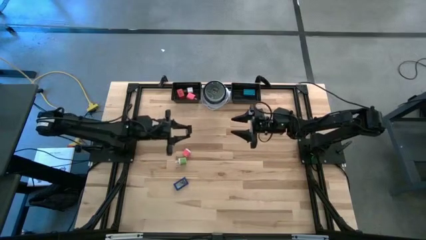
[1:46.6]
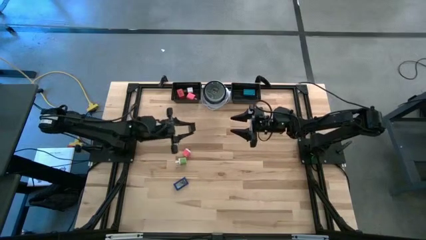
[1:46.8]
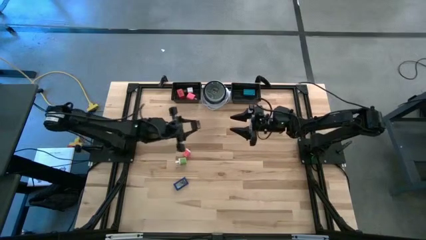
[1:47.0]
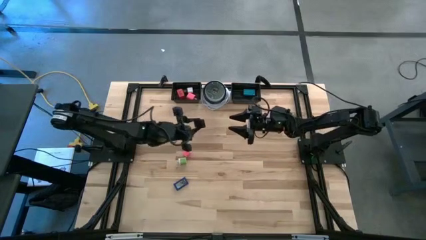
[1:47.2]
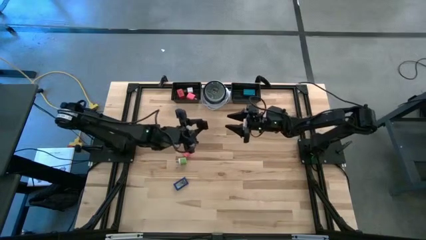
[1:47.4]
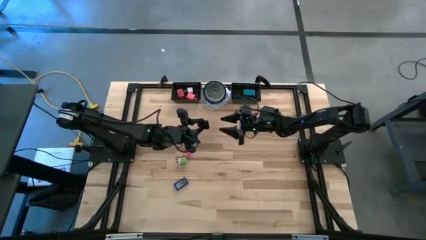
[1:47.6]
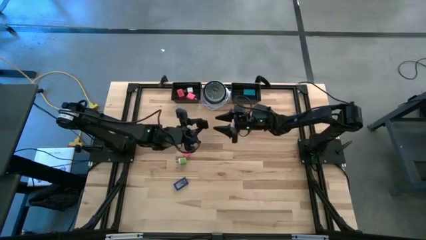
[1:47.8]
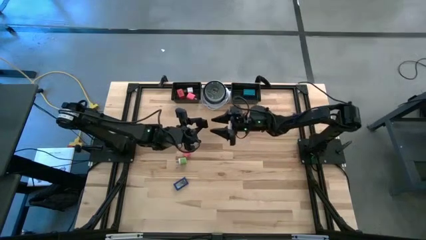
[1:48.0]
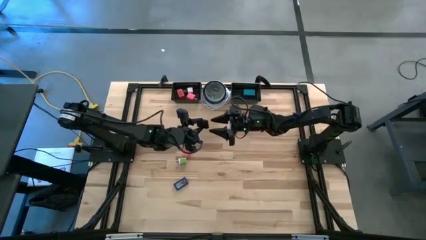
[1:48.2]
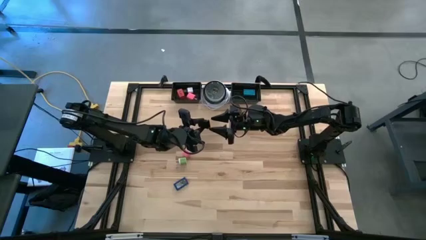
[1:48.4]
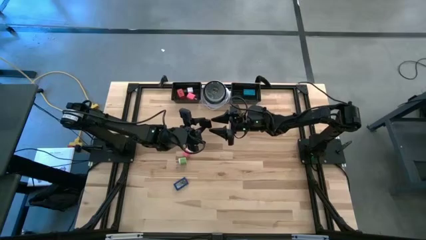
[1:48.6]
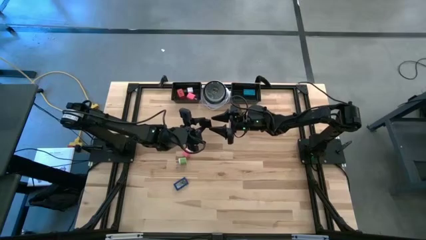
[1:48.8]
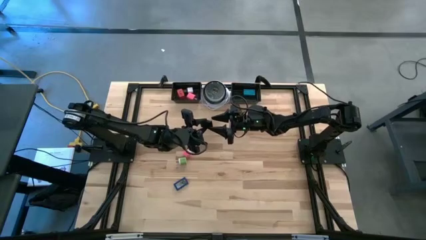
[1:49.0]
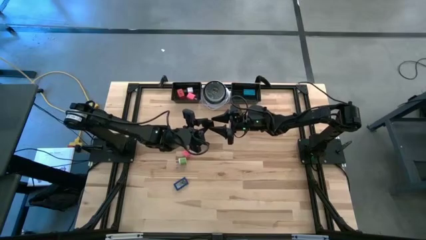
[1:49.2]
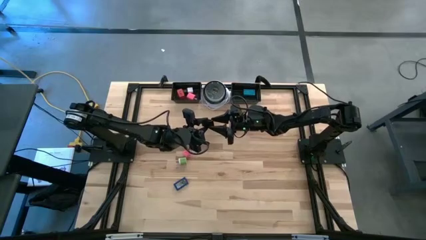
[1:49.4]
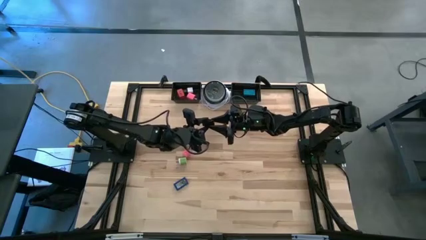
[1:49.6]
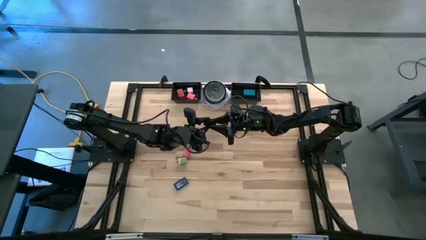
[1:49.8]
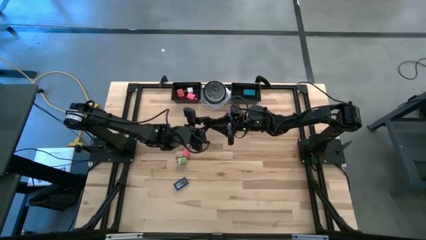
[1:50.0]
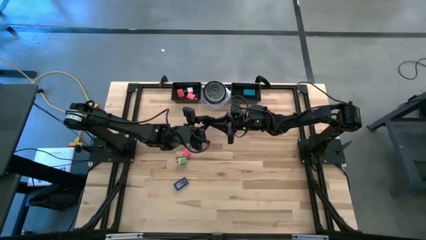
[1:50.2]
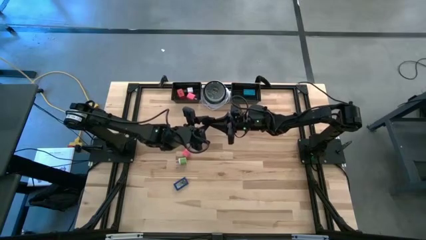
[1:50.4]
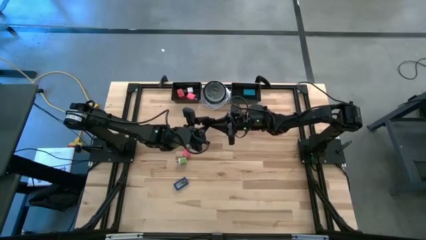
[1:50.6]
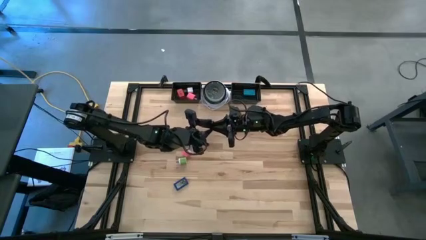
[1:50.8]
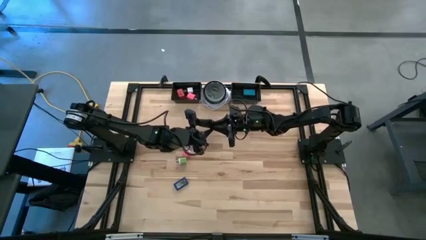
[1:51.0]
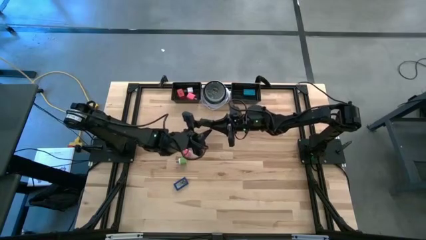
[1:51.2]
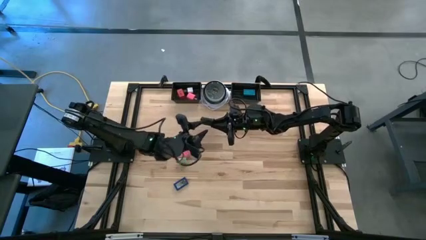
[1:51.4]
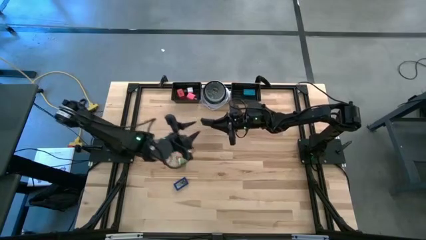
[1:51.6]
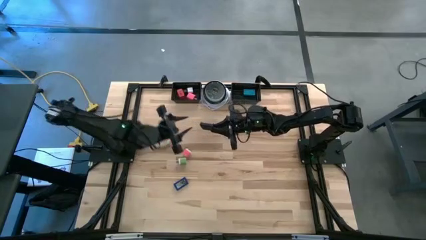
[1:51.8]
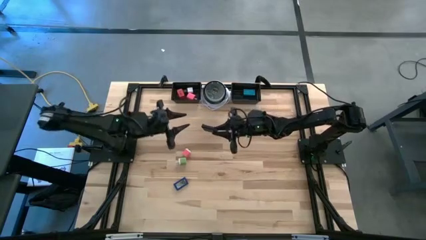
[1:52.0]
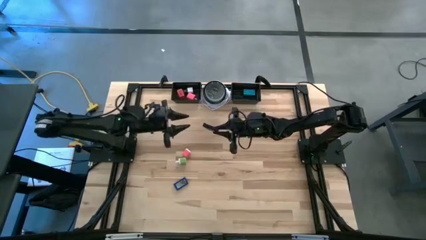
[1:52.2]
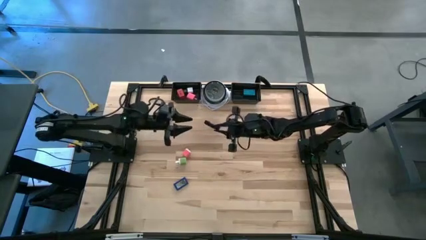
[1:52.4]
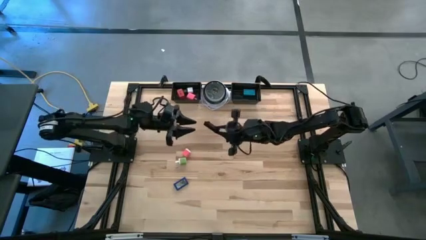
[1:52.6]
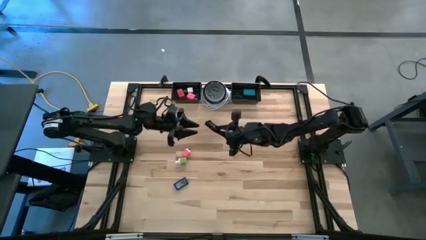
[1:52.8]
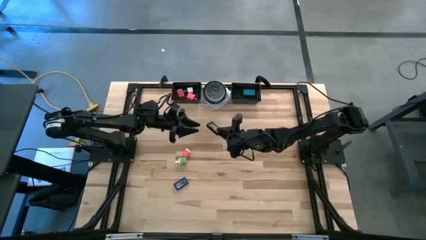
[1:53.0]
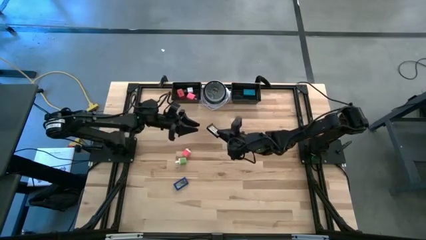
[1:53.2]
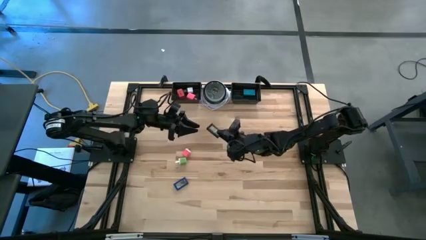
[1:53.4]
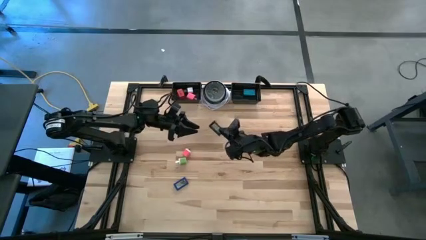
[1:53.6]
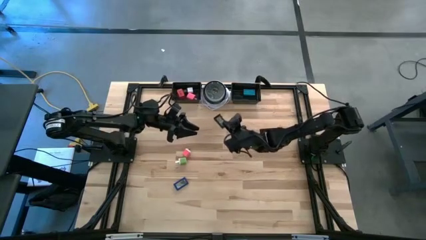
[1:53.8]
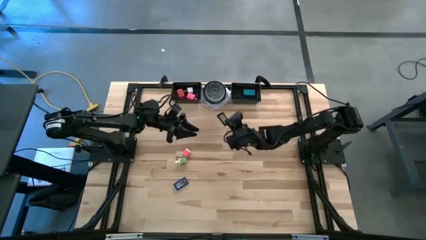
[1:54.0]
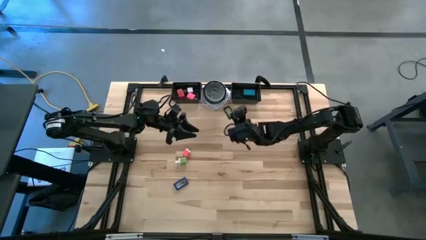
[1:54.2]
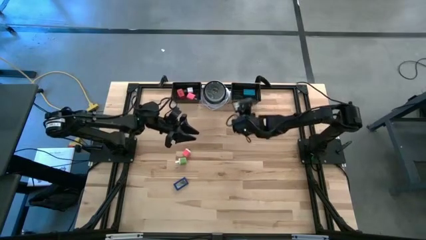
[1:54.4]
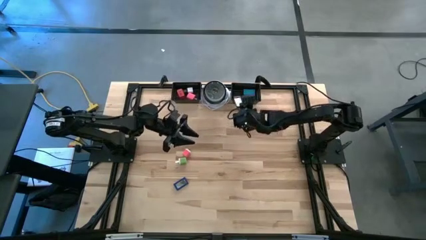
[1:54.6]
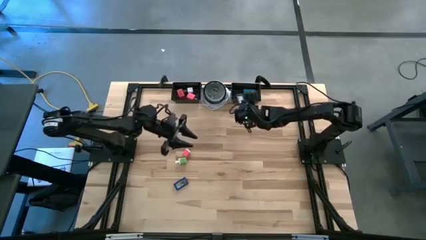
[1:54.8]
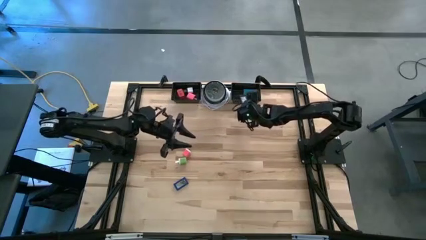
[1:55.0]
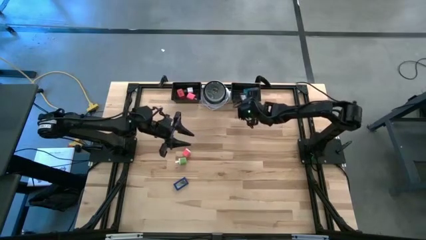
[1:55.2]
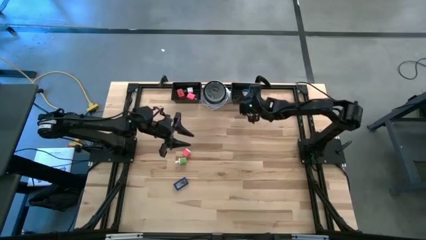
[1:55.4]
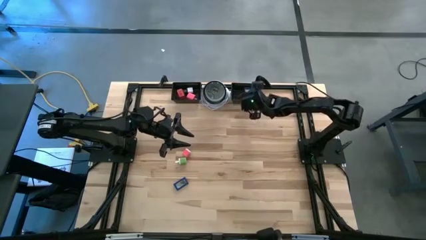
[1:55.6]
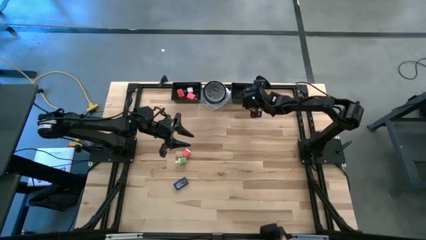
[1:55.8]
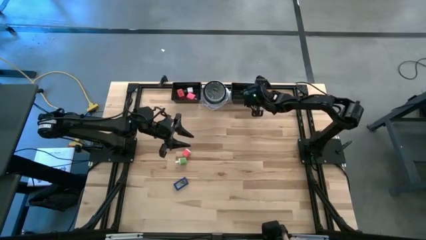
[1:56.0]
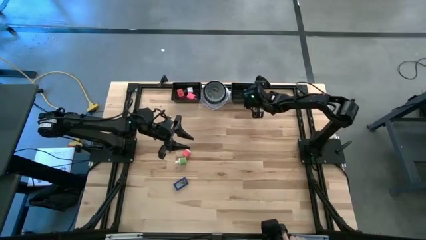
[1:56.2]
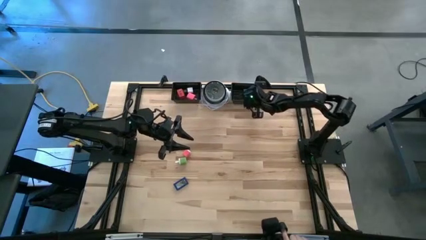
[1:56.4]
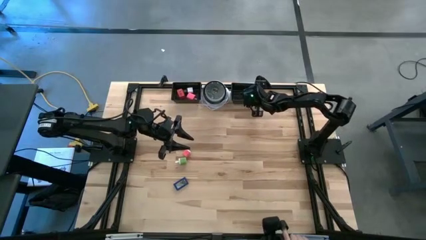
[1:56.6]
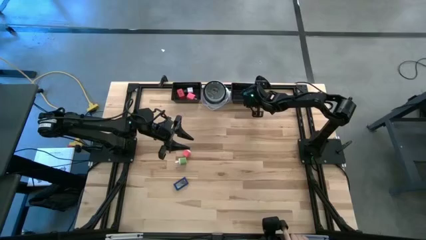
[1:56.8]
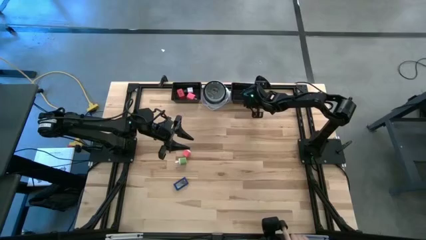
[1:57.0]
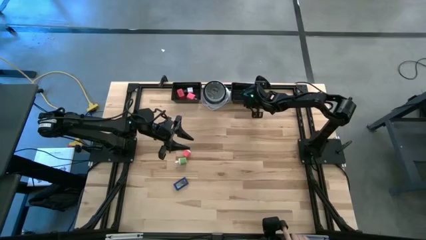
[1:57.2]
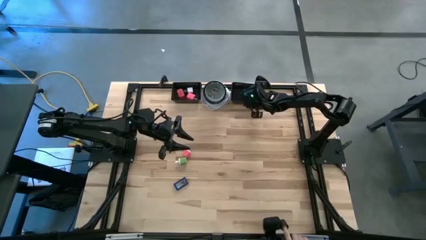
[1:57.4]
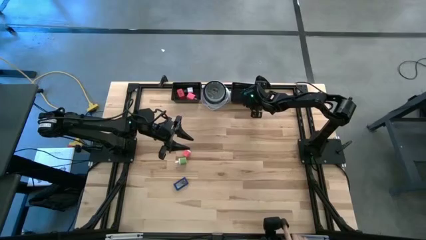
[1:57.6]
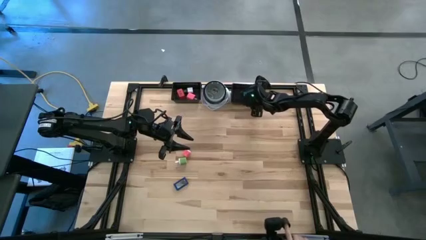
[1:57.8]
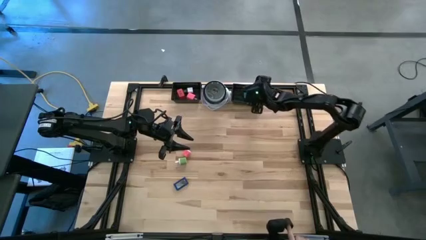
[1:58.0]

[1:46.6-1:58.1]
Task: Pick & Place Office items
Put the black digital clock into the right black basket
